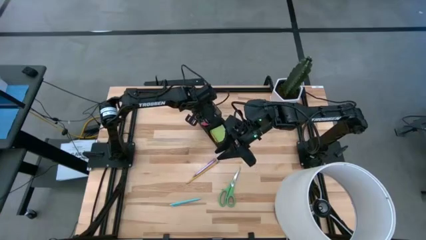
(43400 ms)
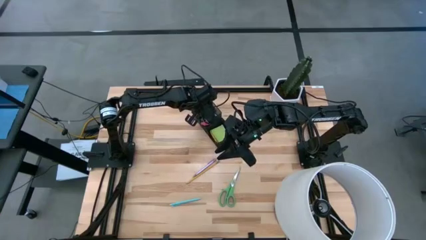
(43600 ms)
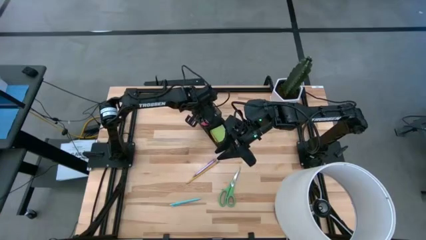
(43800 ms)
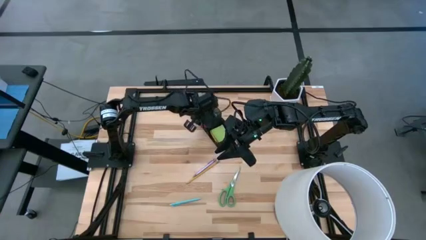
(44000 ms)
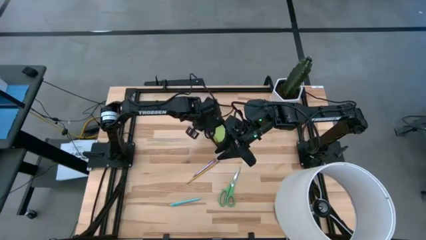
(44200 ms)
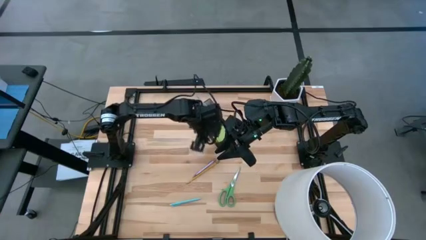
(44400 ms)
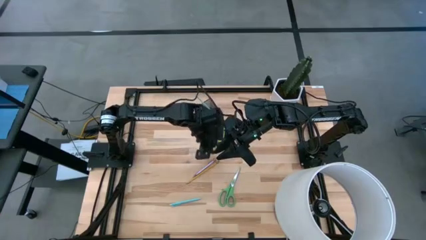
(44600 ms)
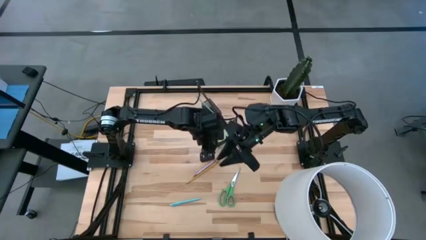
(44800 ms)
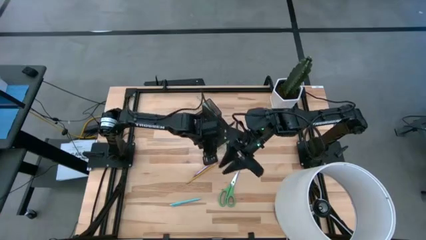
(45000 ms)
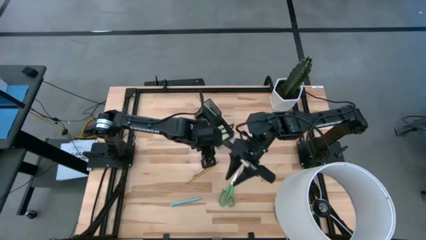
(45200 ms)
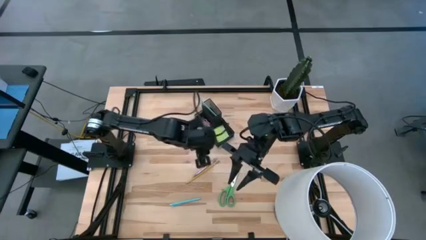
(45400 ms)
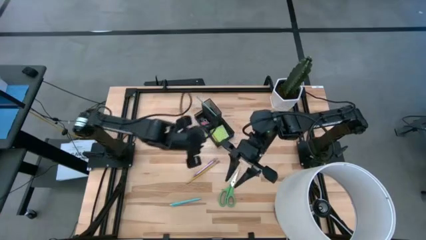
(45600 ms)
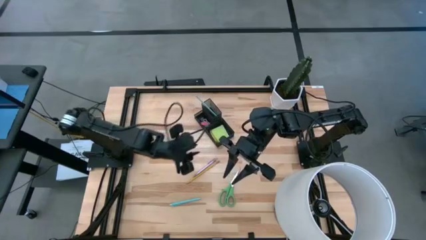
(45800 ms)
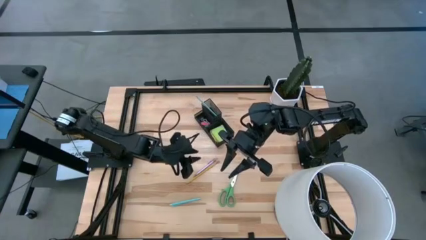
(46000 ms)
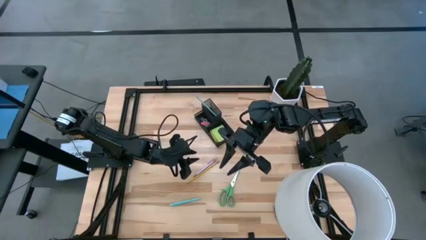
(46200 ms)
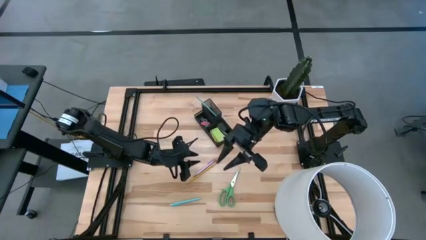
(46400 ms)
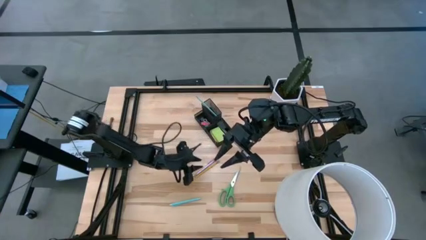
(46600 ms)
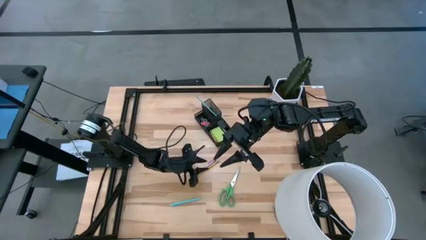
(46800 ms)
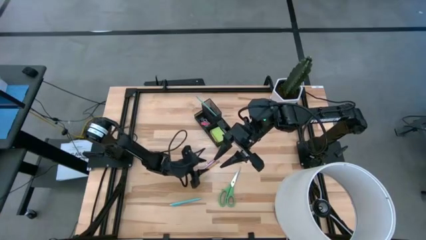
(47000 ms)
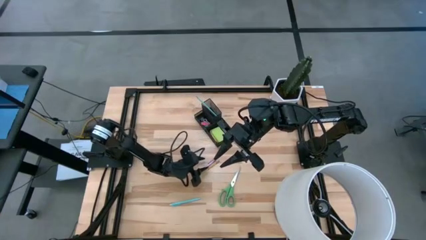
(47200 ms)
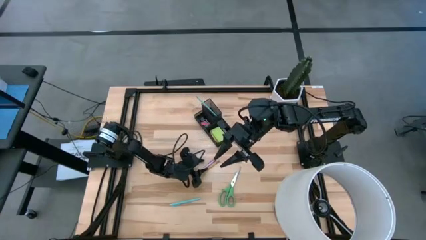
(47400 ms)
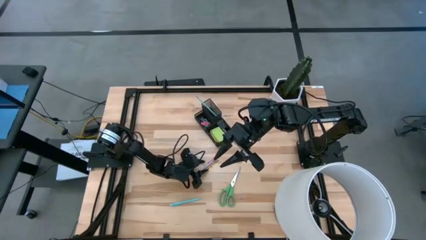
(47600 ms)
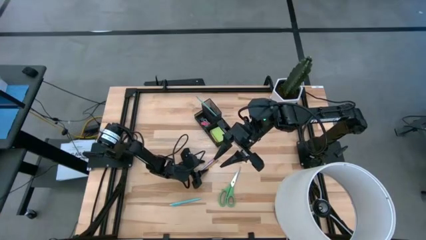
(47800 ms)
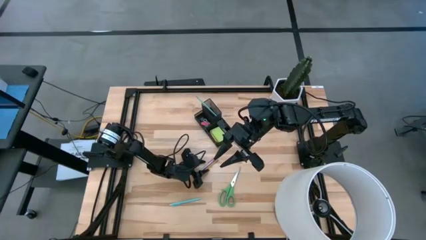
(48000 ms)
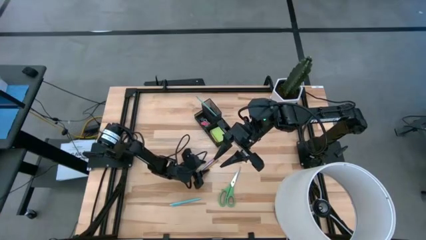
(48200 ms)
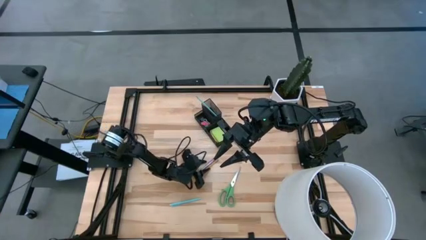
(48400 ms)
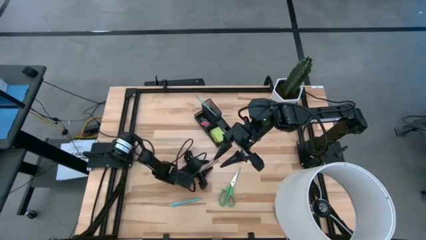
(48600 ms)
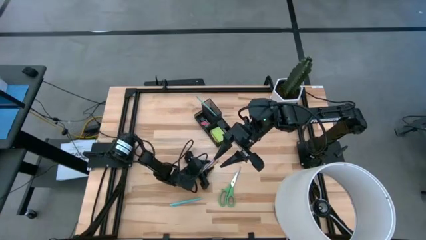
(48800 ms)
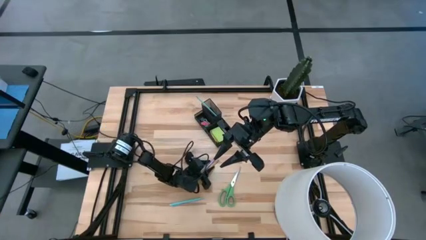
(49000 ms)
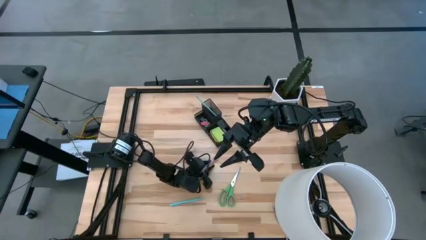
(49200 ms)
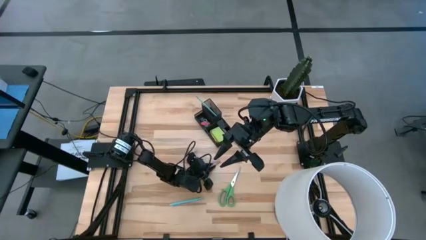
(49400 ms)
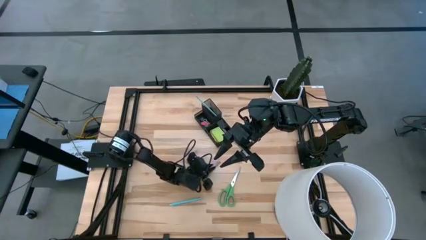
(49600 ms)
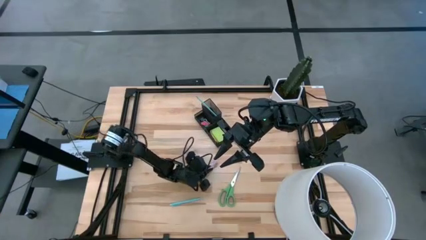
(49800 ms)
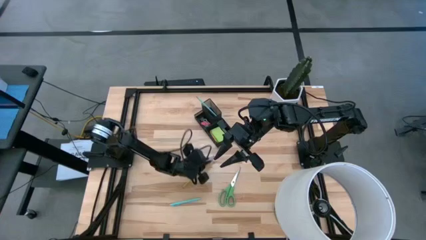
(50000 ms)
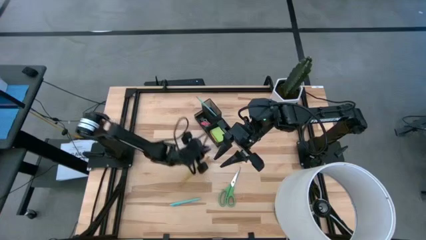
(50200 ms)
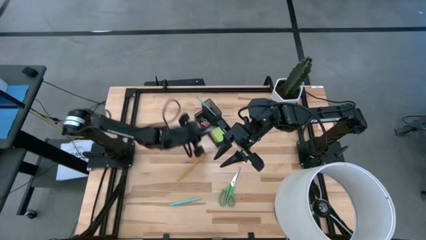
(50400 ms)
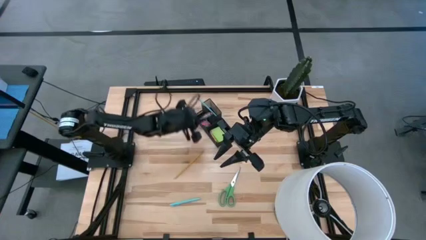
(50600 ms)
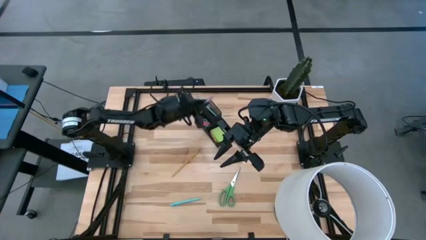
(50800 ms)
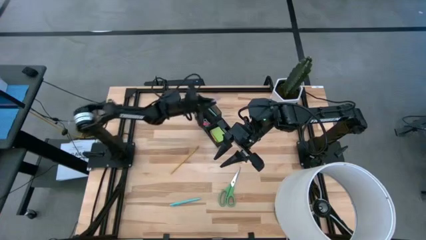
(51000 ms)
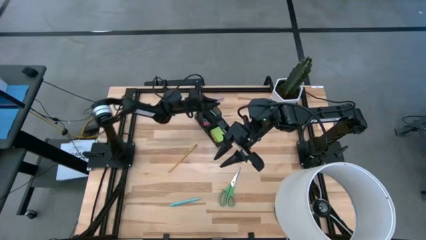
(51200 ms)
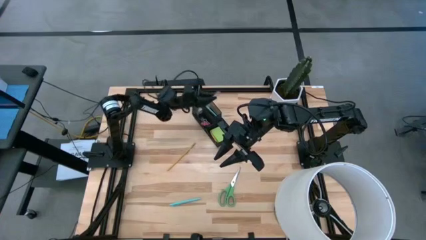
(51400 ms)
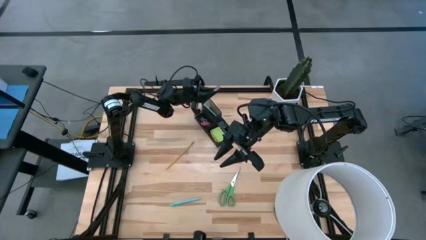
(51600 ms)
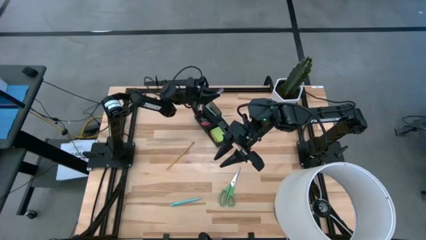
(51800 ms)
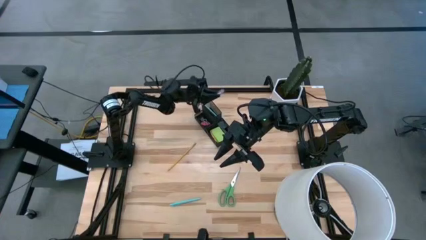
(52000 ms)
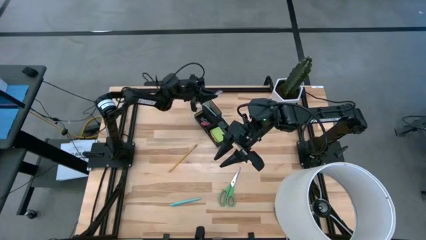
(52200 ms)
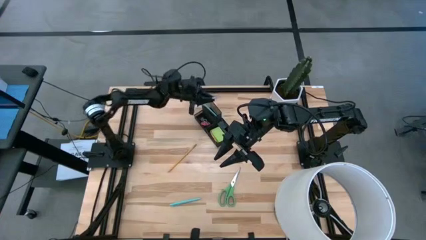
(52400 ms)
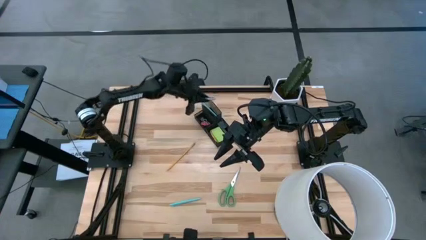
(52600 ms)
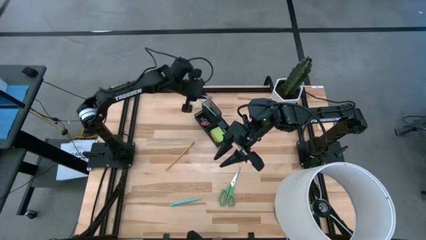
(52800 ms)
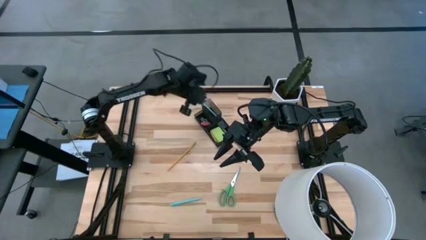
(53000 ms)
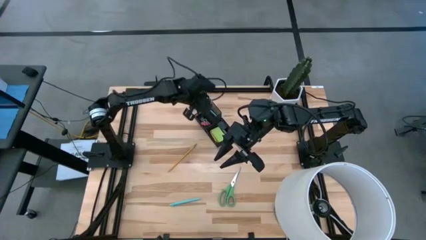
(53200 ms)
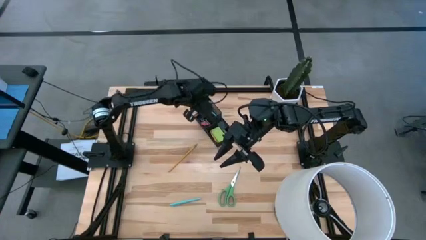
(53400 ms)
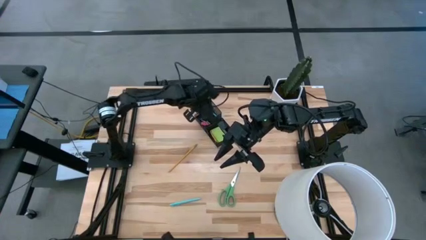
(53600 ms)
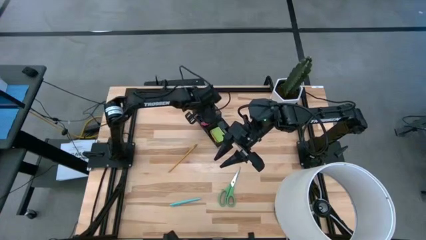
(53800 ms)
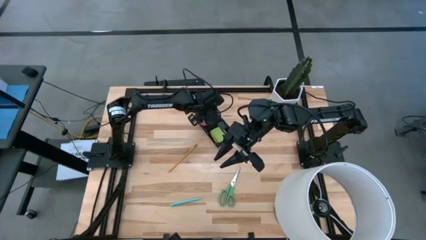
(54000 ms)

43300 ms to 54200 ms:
Task: Pick and place office supplies into organizer
Put the purple pen into the black desk organizer

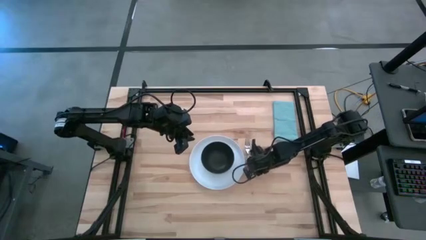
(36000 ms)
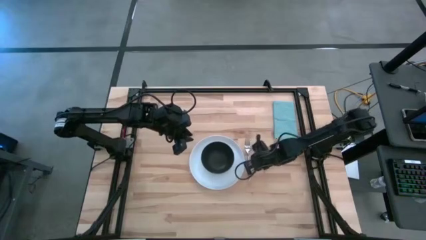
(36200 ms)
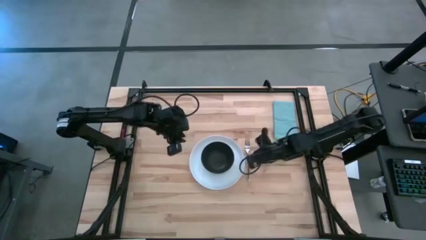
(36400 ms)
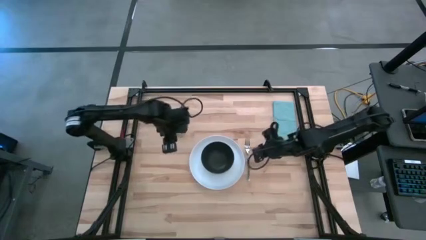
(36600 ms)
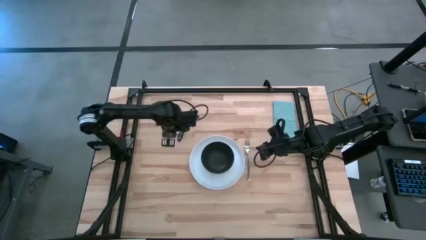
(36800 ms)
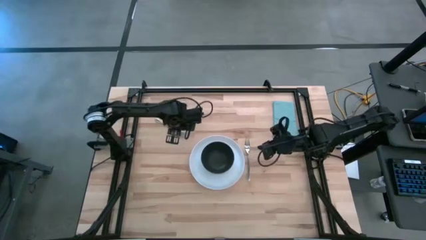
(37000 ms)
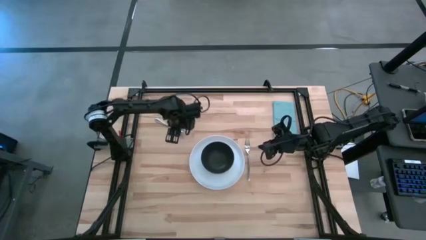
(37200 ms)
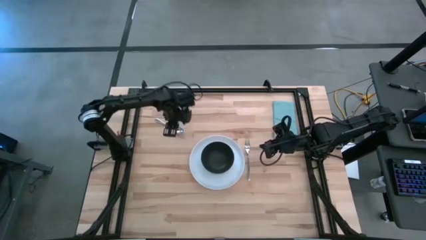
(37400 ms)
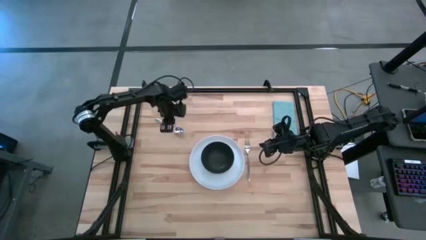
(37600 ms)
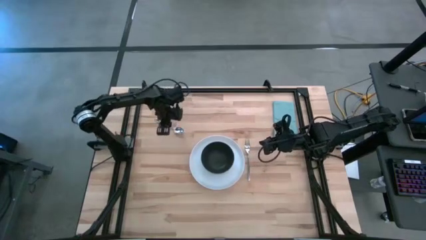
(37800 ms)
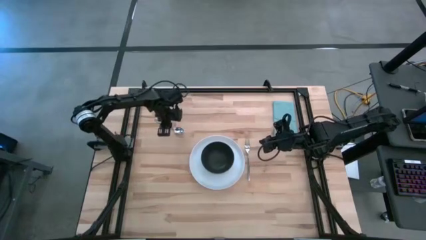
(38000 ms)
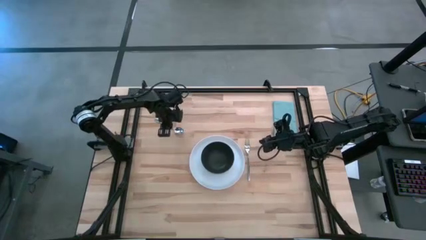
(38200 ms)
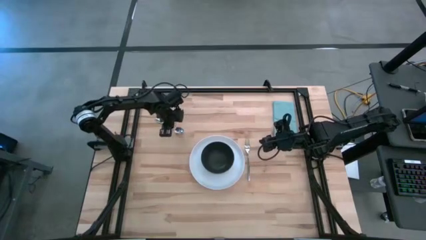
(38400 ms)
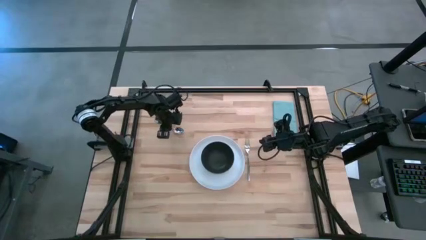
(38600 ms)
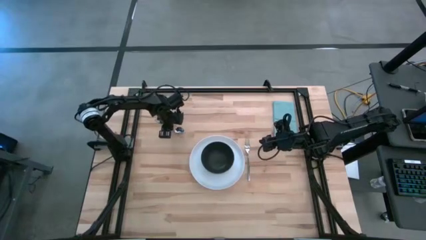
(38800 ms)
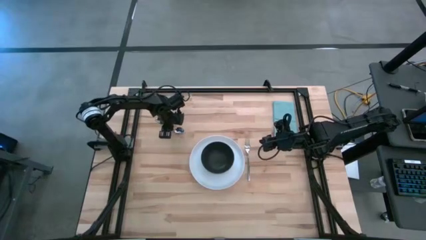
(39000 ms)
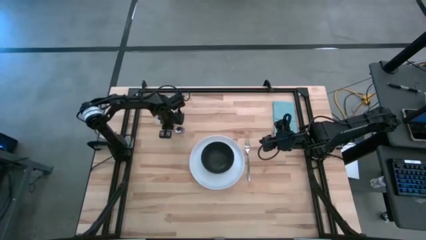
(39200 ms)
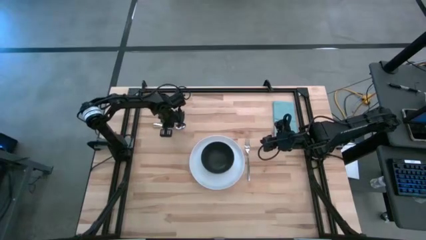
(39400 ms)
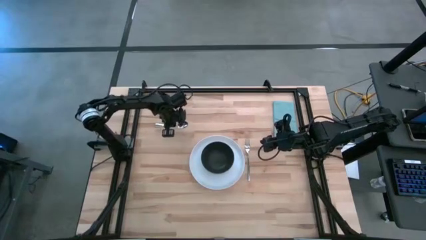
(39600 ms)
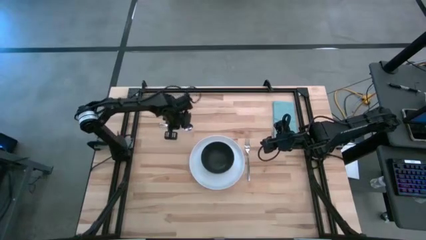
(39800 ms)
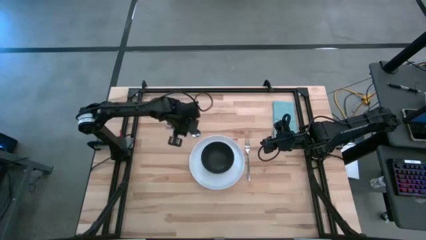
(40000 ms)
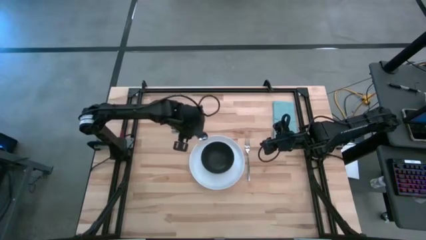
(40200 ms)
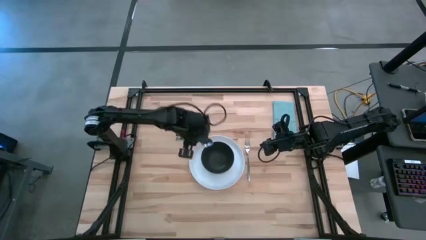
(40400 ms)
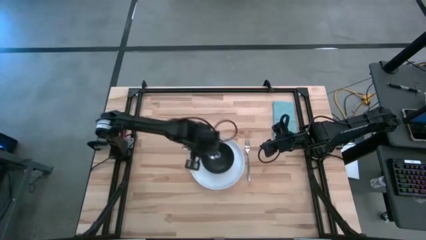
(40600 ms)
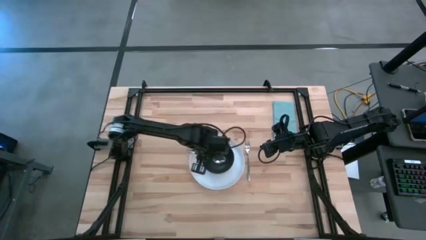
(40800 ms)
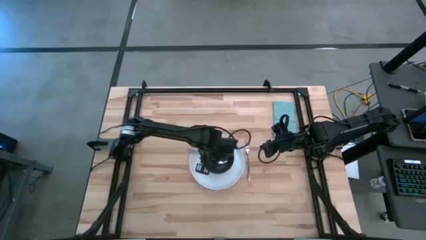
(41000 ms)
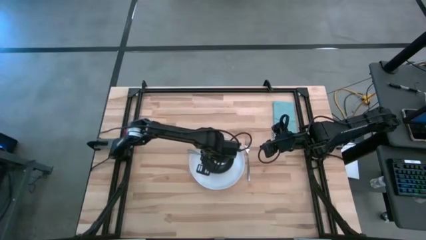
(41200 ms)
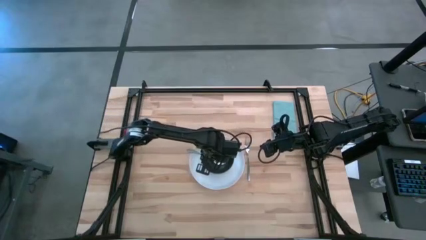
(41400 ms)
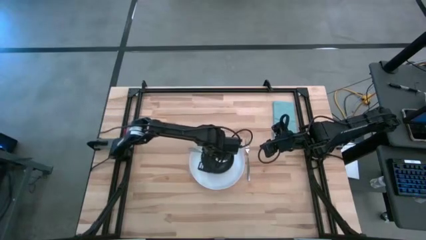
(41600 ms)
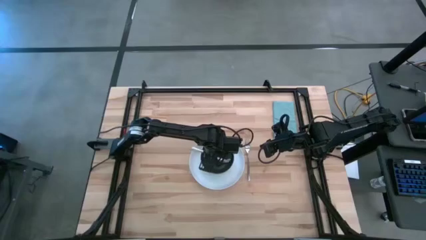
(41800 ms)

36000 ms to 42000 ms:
Task: Set table place
Put the spoon into the bowl
